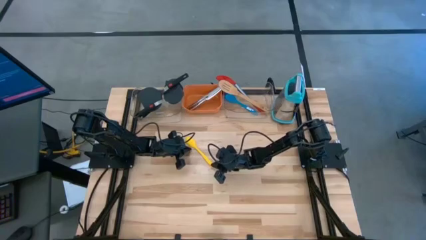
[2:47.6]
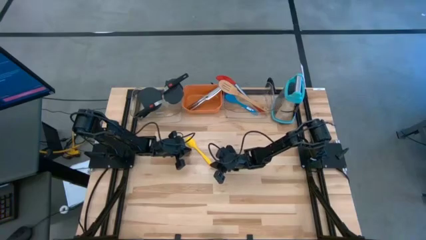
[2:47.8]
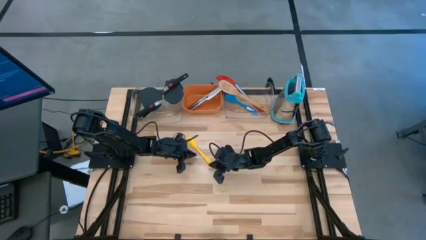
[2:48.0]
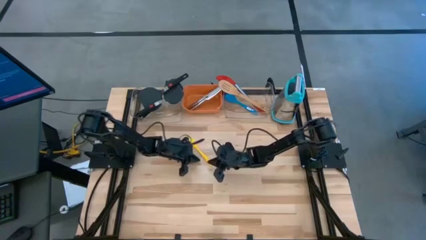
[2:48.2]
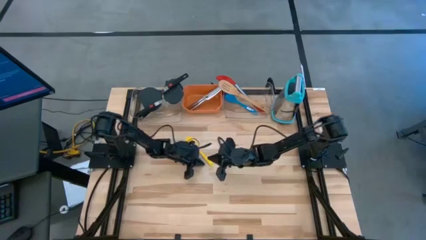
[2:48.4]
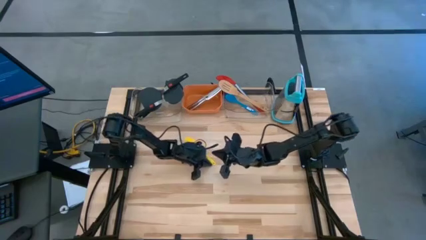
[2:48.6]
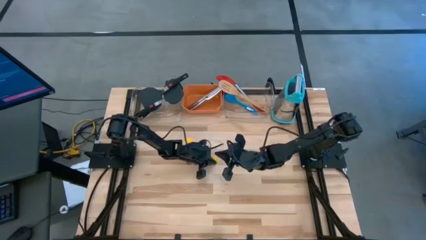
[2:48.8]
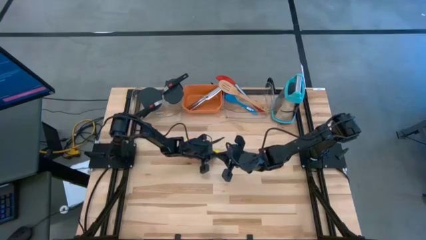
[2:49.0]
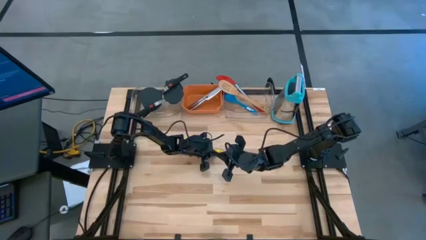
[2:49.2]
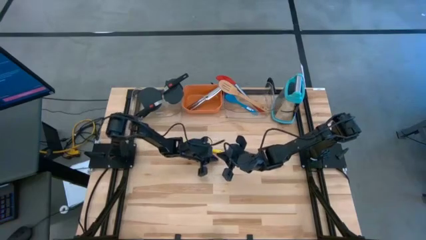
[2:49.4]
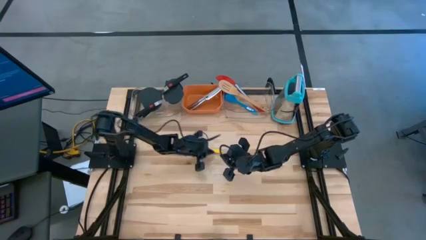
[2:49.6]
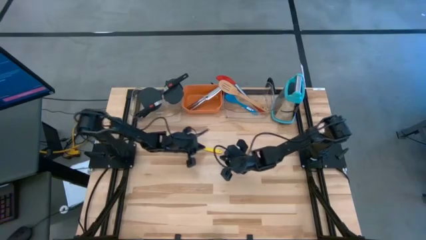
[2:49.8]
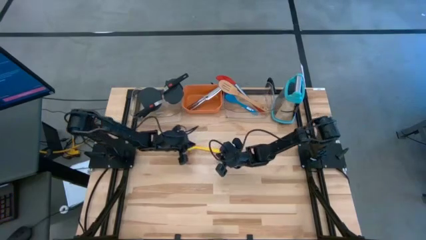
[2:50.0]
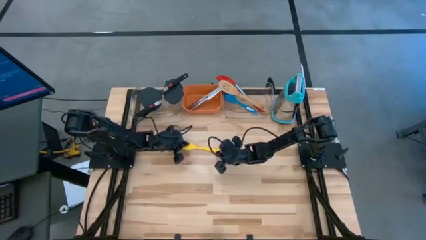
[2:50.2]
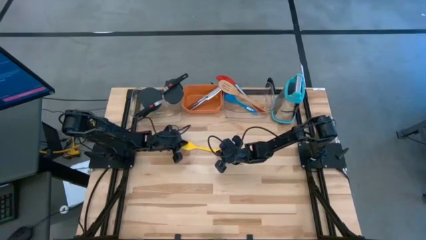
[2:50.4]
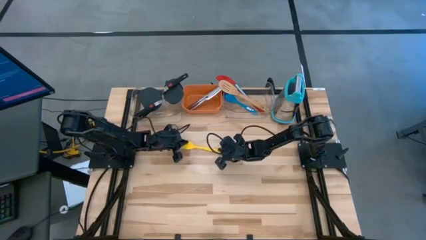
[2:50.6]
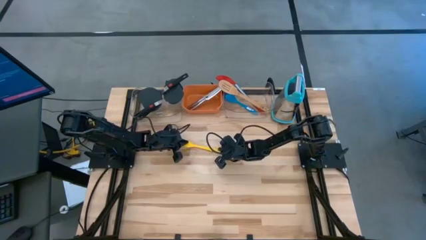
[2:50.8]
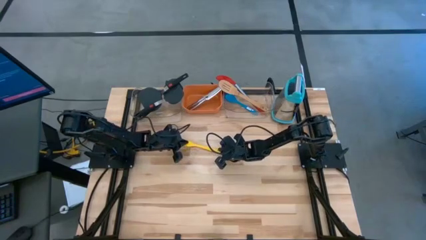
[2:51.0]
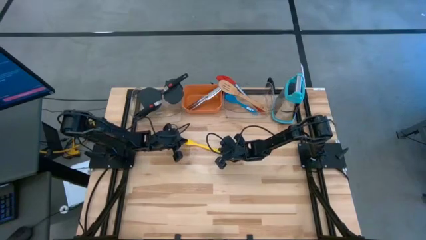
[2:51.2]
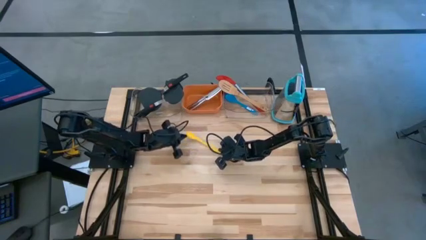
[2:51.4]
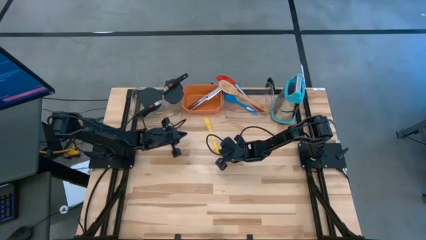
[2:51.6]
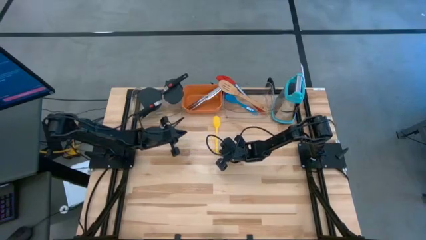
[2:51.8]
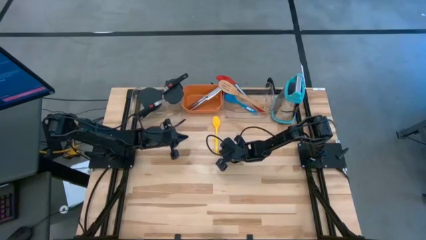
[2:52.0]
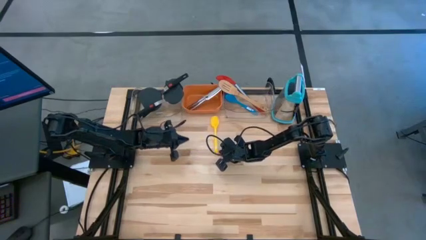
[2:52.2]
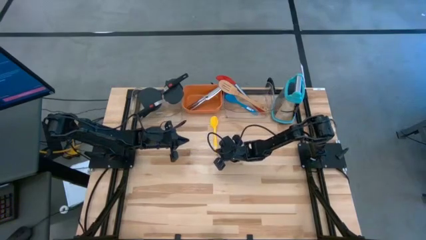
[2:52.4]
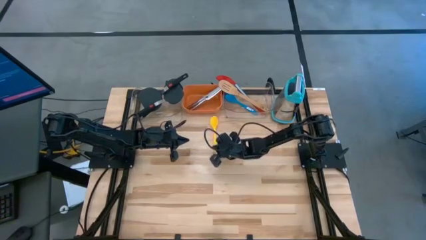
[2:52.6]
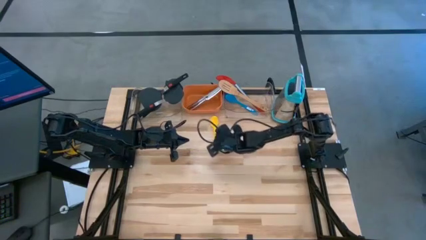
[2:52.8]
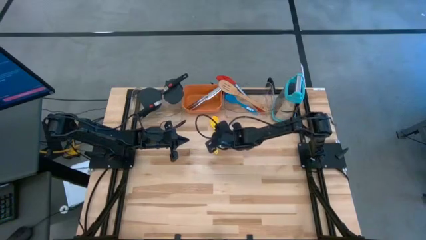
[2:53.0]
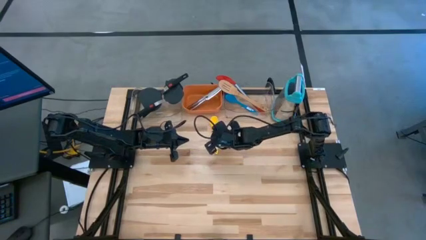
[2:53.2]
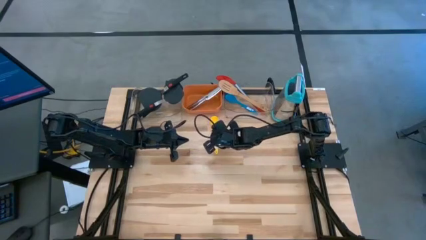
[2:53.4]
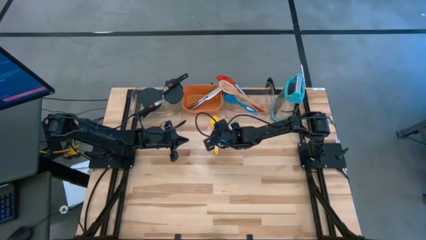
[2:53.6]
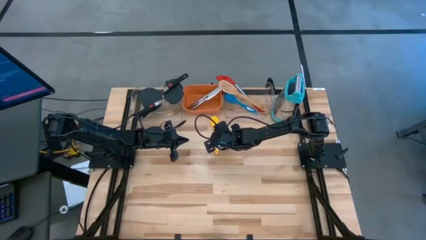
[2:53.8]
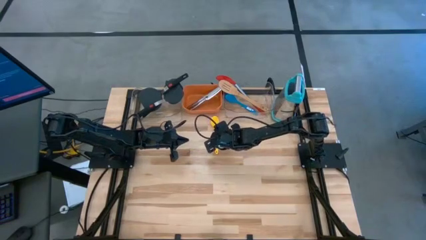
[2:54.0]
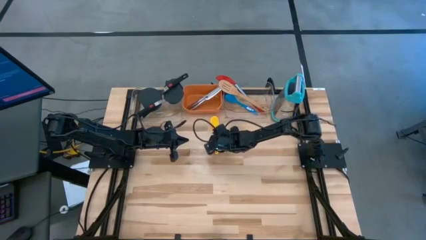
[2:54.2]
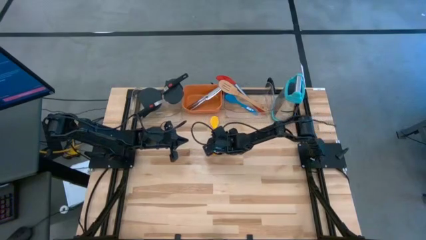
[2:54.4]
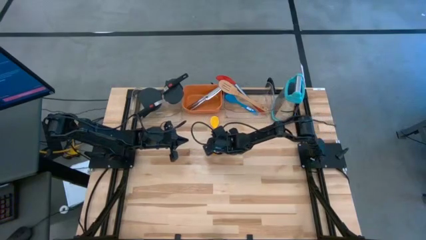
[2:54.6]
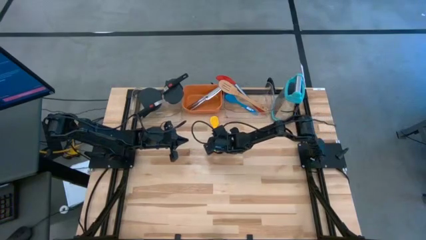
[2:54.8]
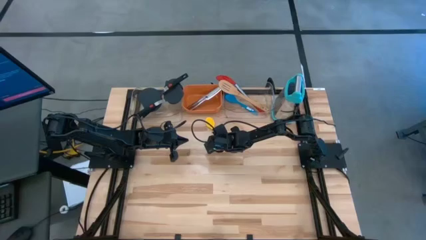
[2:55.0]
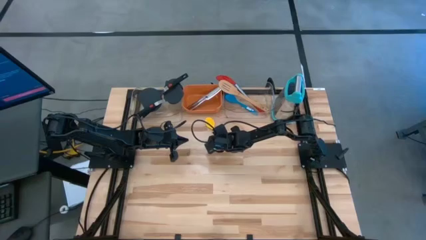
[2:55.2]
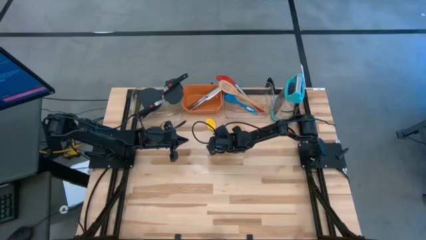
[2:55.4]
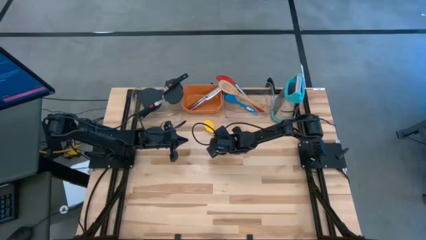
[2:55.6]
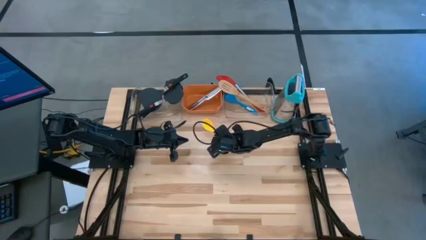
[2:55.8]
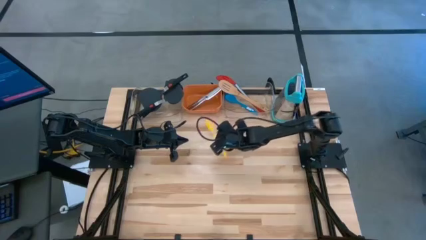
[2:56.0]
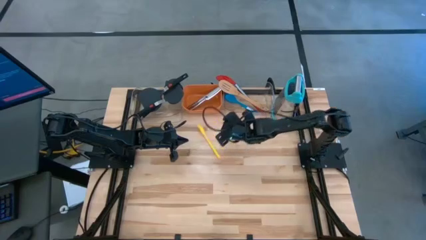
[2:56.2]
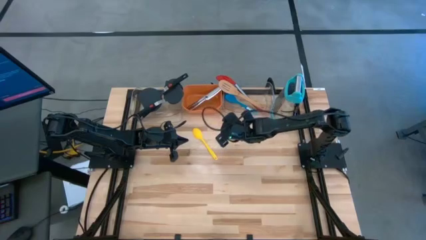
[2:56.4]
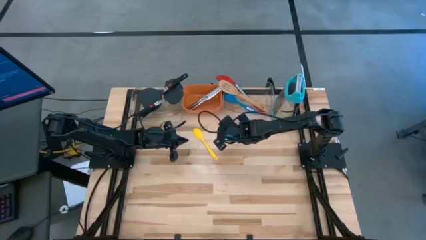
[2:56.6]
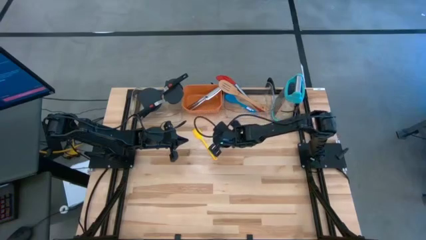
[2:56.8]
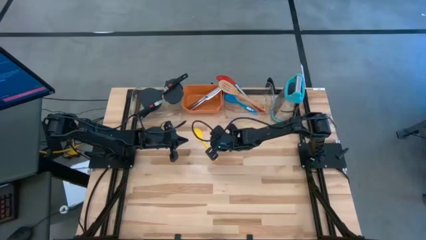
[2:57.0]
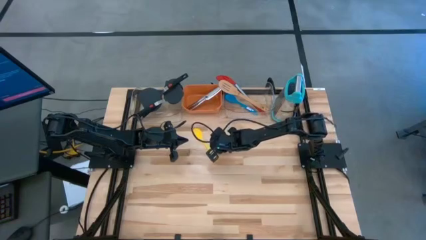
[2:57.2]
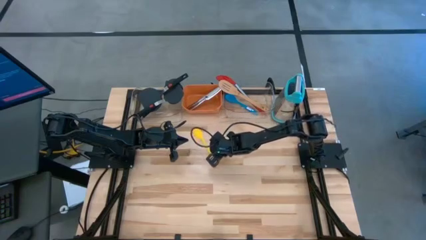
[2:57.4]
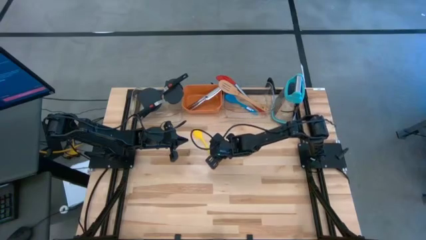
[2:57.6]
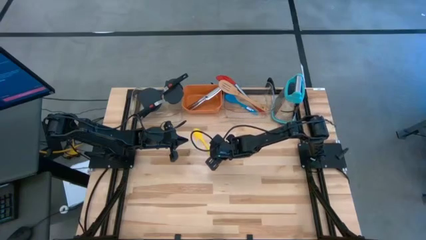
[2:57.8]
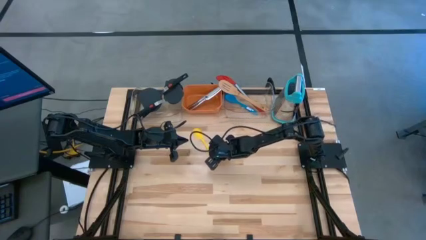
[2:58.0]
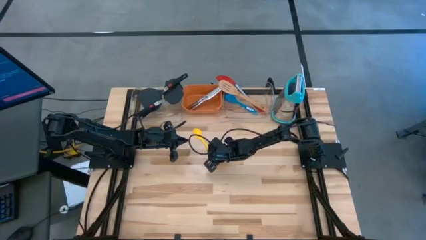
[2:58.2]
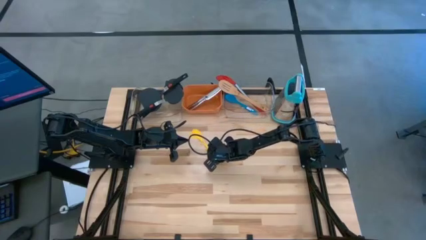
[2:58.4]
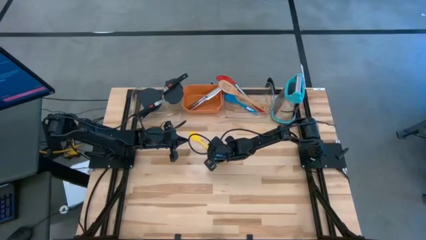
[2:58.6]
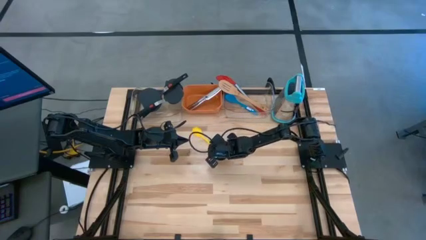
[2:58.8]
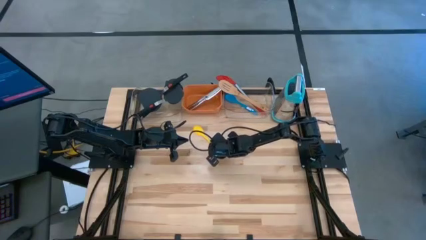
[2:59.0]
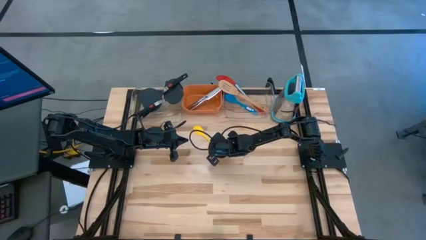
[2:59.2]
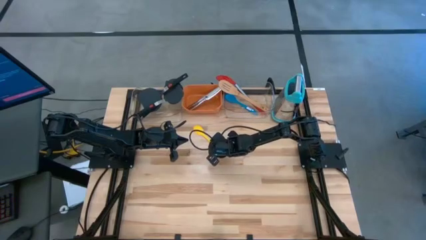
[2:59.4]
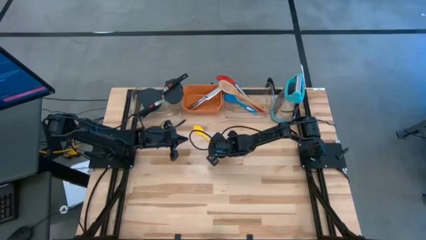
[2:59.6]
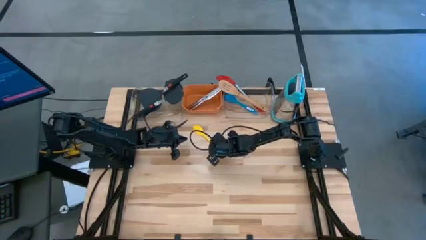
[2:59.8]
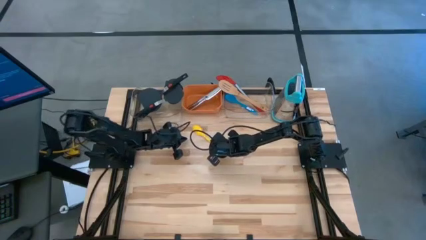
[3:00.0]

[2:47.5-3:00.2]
Task: Pick & Place Kitchen Items
Put the yellow serving spoon into the right transparent bin
